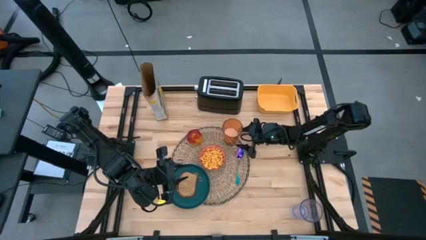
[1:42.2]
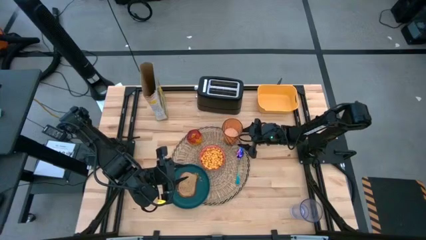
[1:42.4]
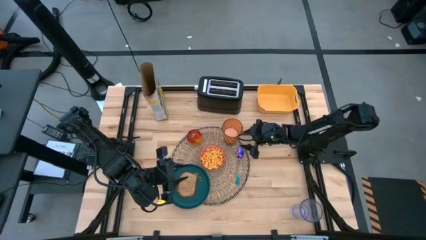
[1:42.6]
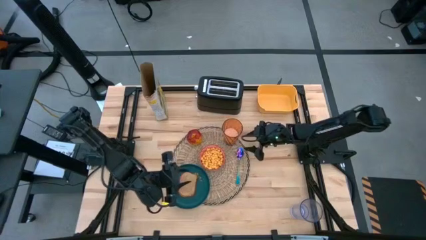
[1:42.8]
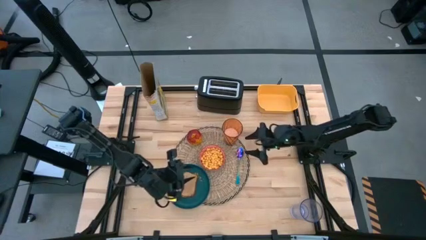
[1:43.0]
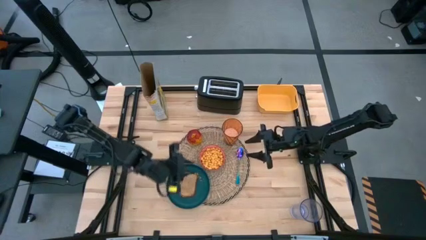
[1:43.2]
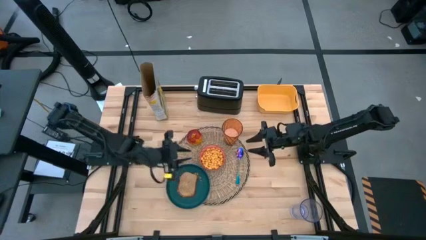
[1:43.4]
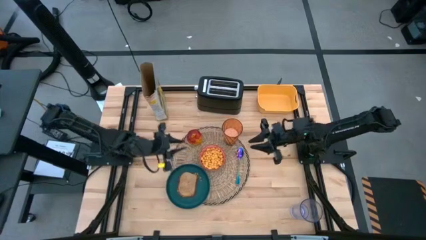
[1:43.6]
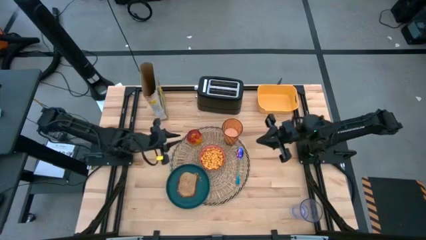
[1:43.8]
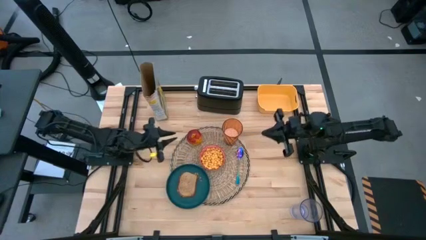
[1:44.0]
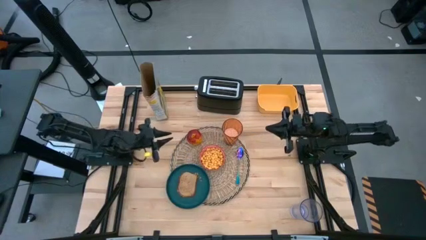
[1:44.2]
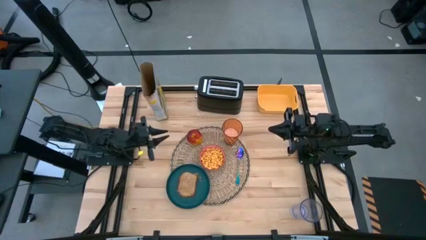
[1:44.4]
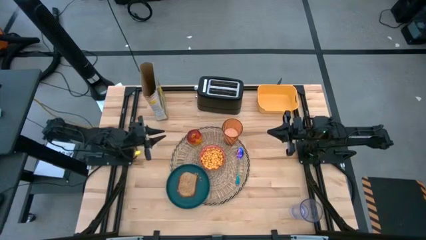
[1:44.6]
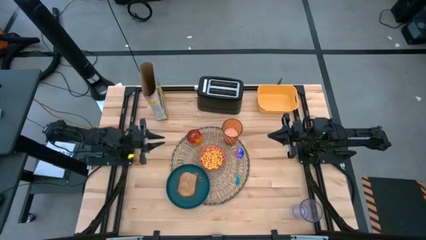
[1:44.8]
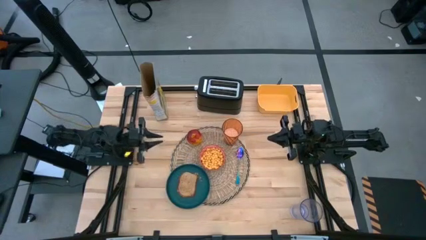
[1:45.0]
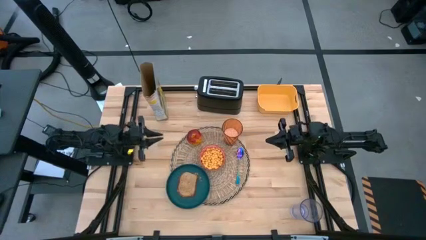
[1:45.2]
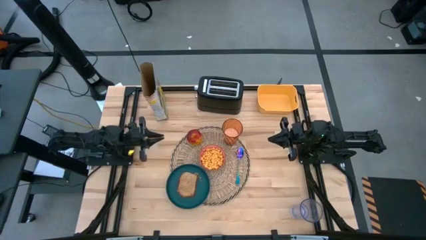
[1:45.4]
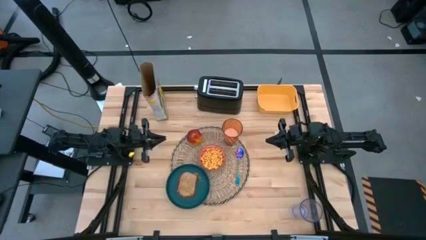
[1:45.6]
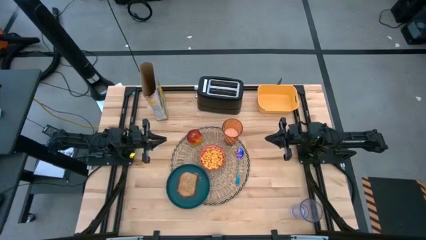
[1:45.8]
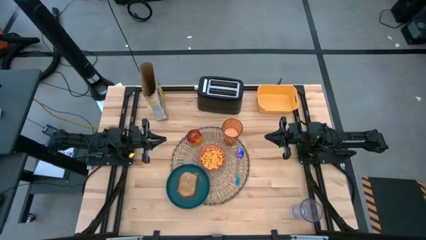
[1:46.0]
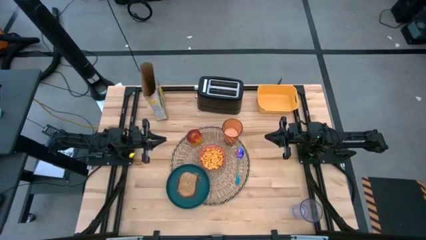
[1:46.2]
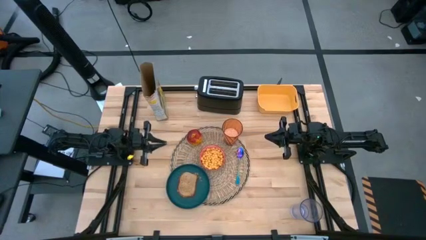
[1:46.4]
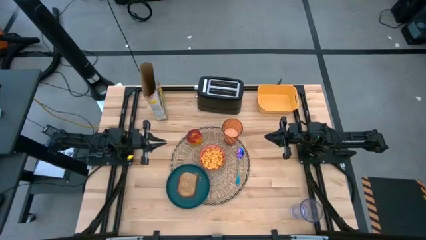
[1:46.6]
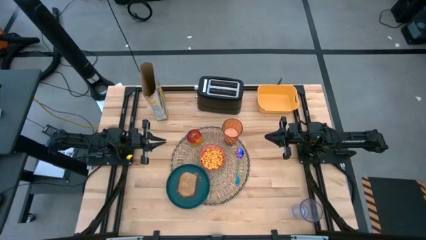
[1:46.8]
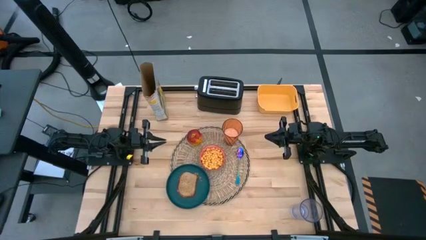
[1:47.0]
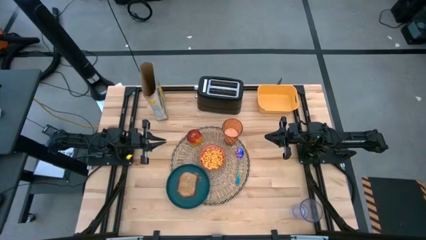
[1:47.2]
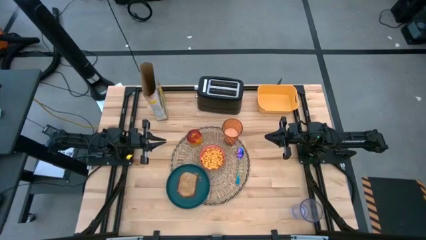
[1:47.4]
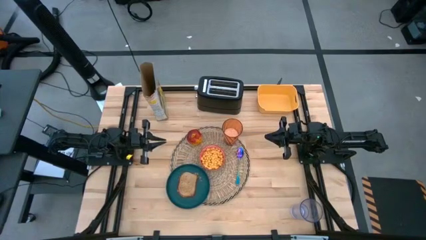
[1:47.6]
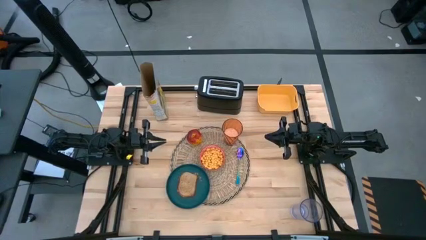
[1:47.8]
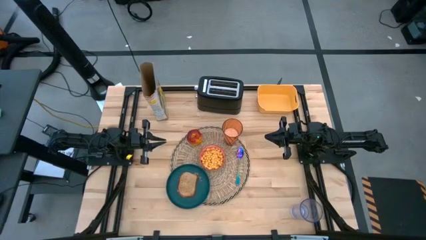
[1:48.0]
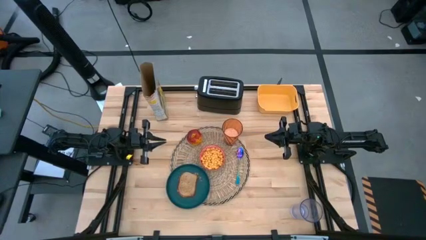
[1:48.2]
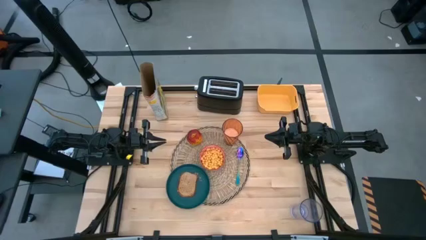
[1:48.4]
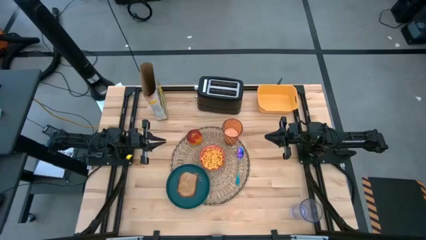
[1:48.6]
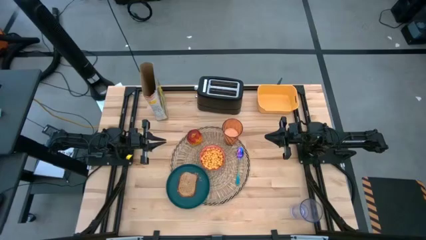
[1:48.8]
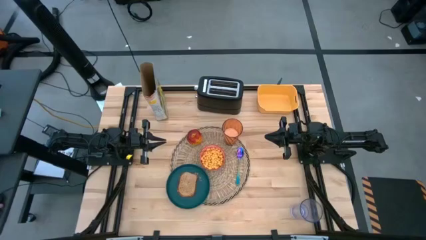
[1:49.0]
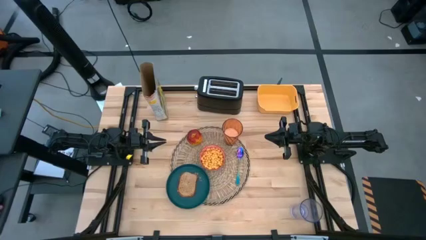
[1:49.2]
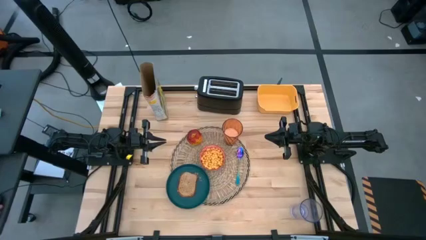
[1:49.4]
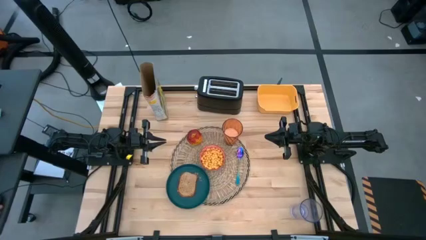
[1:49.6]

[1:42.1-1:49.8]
Task: Arrange a breakfast setting
Return to Home Position

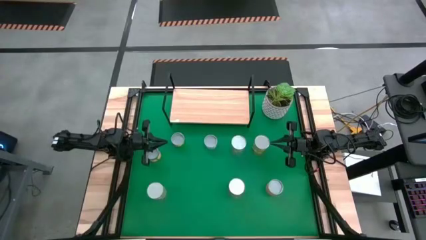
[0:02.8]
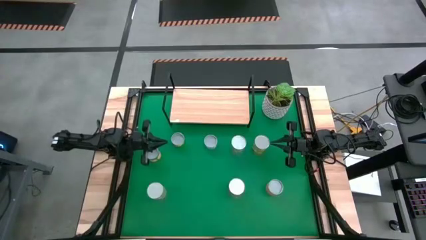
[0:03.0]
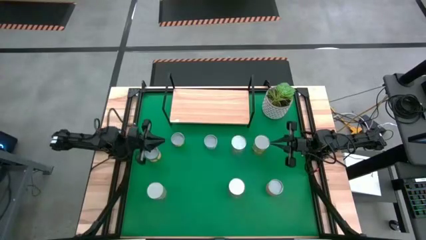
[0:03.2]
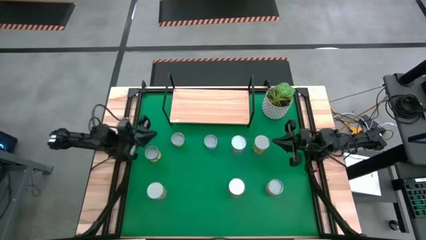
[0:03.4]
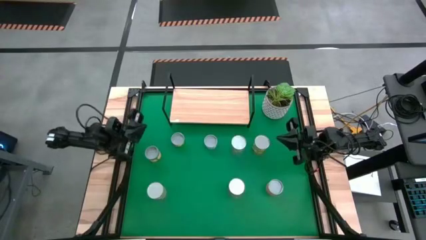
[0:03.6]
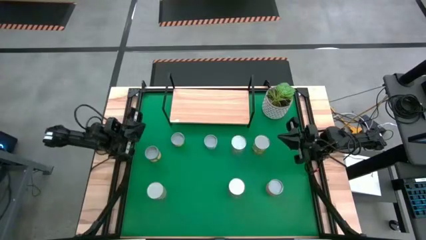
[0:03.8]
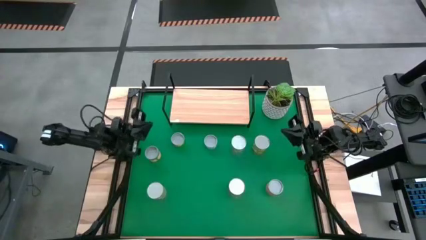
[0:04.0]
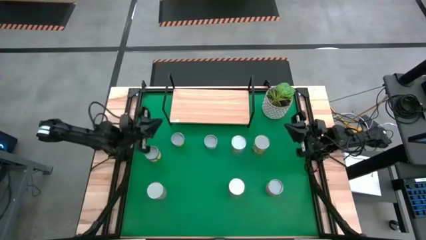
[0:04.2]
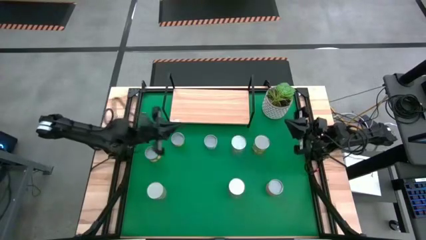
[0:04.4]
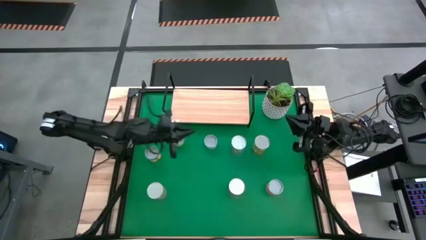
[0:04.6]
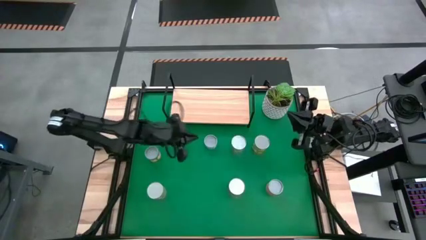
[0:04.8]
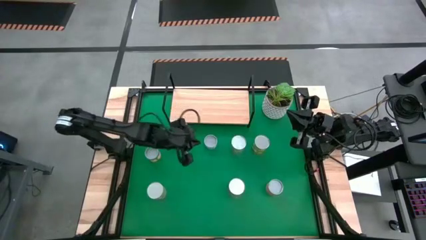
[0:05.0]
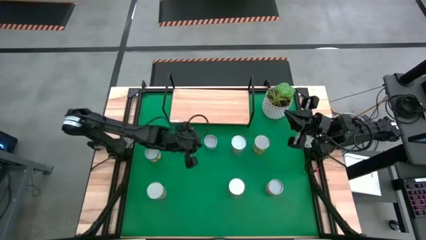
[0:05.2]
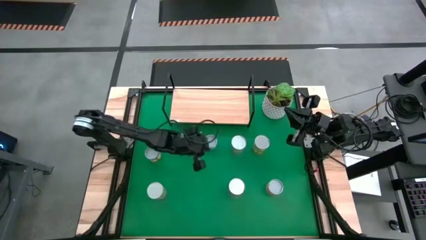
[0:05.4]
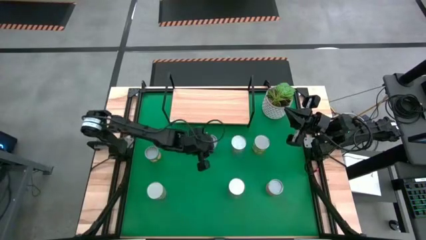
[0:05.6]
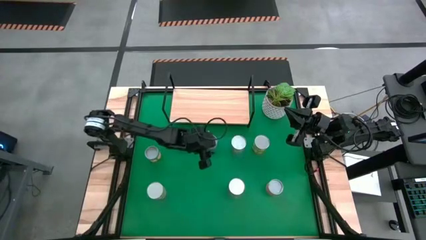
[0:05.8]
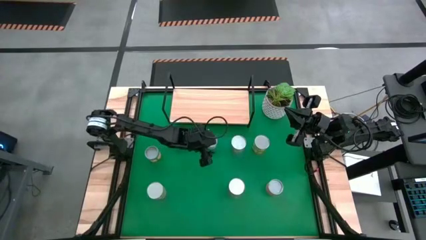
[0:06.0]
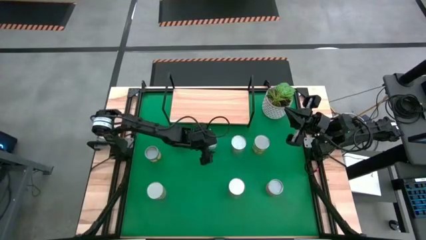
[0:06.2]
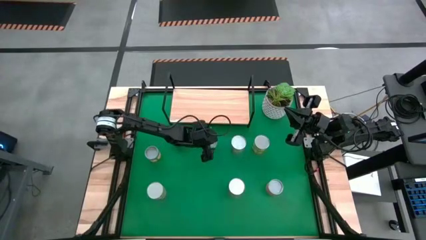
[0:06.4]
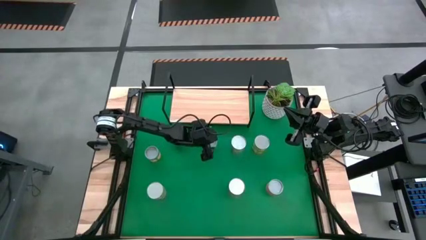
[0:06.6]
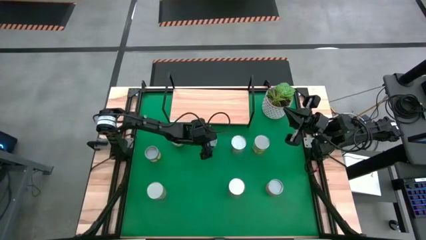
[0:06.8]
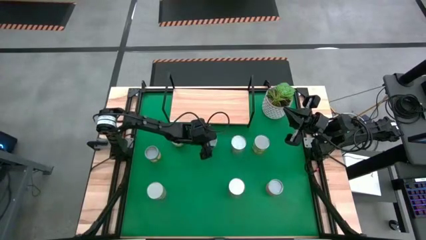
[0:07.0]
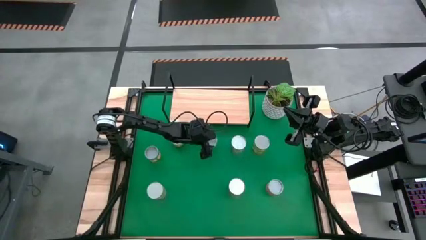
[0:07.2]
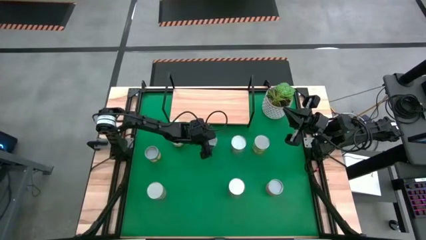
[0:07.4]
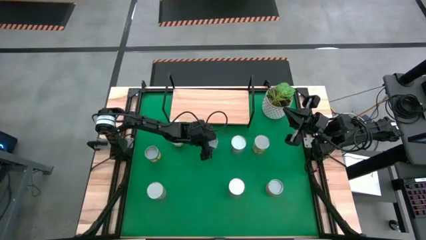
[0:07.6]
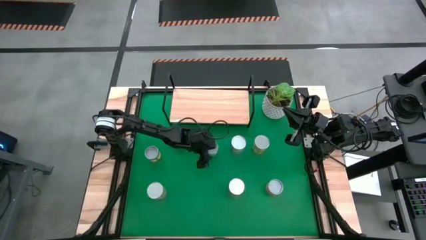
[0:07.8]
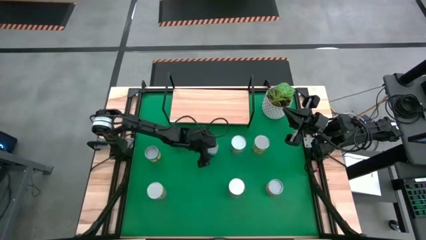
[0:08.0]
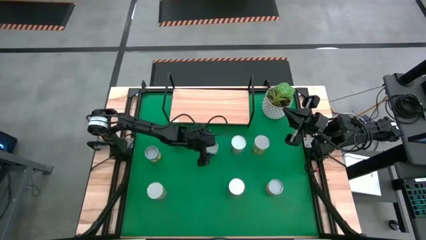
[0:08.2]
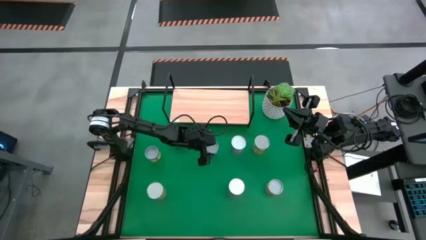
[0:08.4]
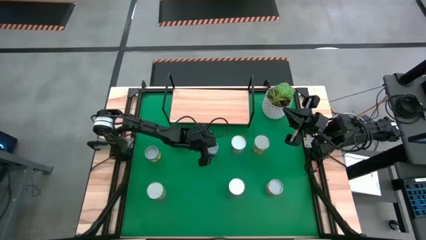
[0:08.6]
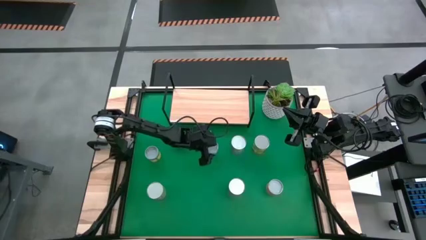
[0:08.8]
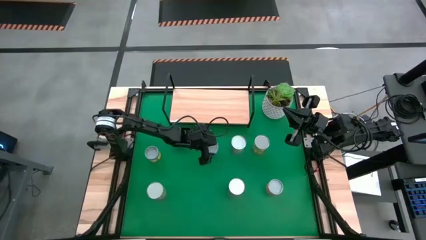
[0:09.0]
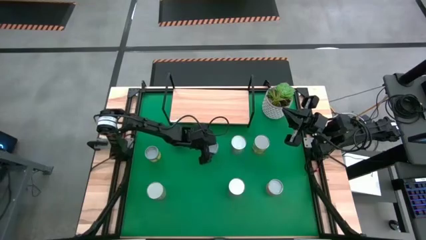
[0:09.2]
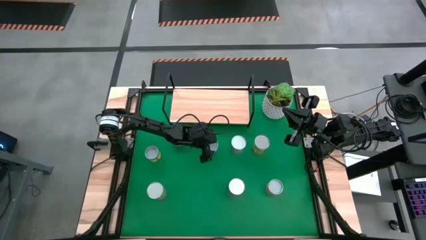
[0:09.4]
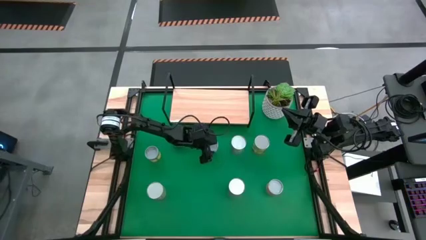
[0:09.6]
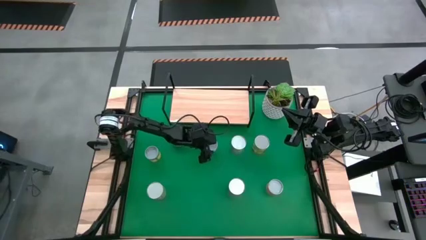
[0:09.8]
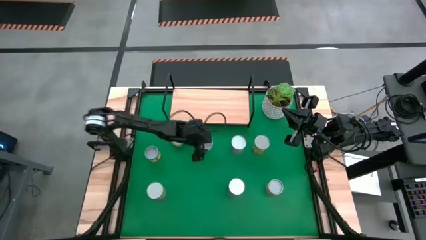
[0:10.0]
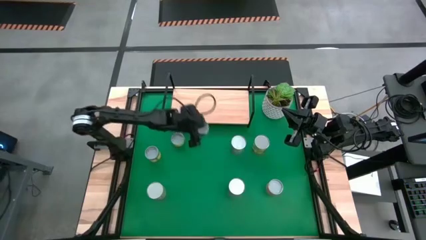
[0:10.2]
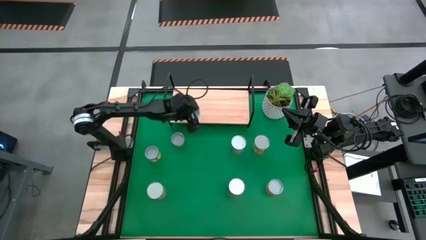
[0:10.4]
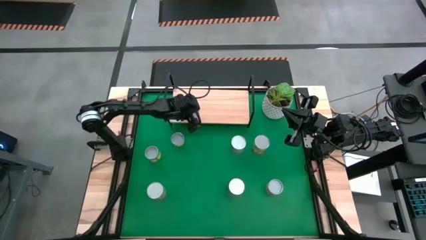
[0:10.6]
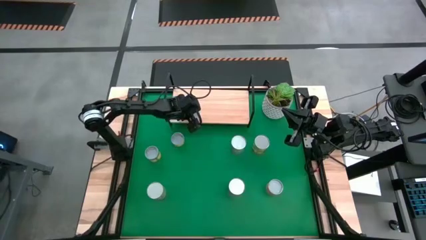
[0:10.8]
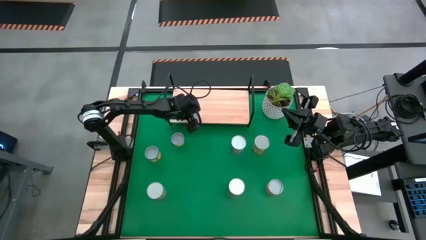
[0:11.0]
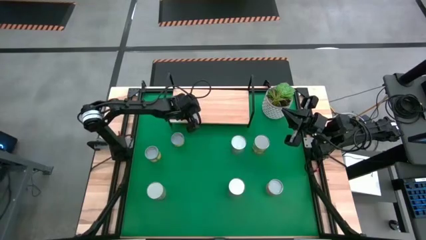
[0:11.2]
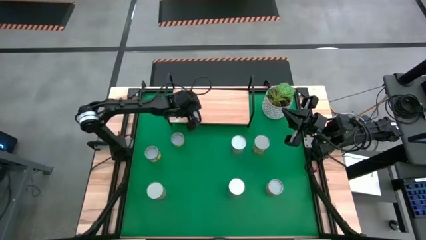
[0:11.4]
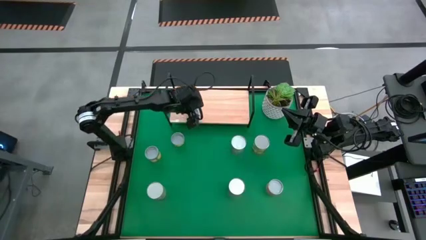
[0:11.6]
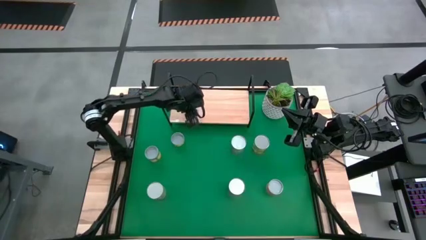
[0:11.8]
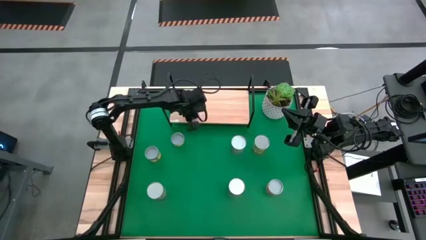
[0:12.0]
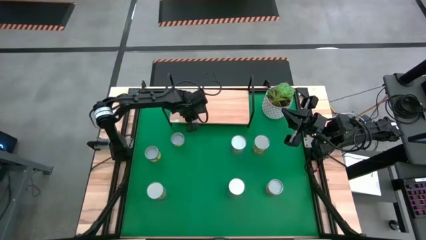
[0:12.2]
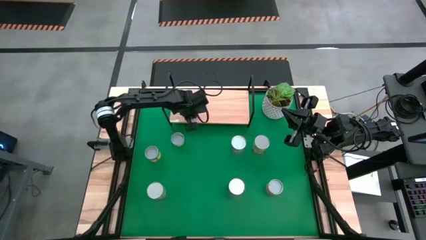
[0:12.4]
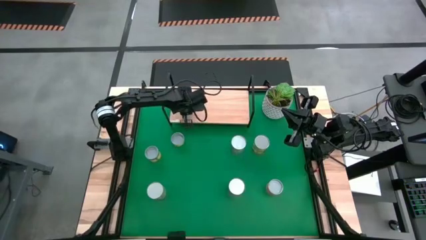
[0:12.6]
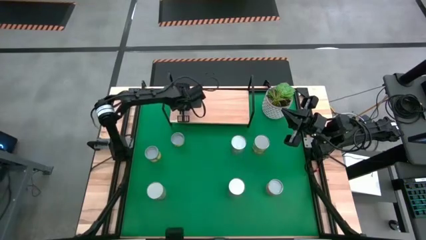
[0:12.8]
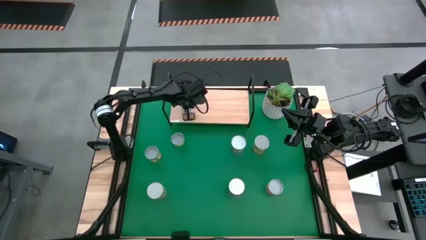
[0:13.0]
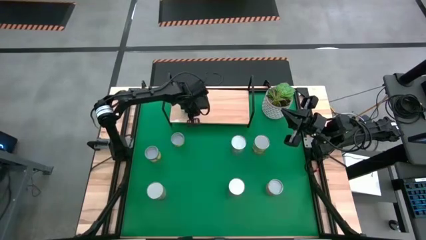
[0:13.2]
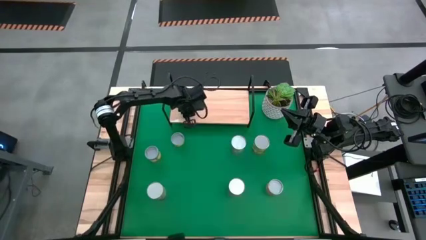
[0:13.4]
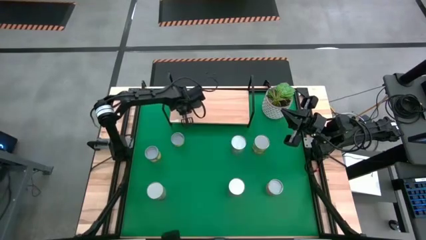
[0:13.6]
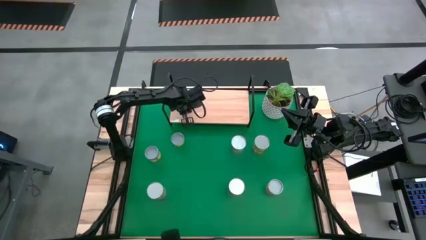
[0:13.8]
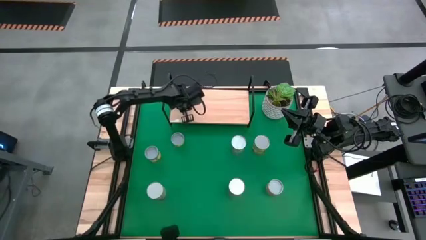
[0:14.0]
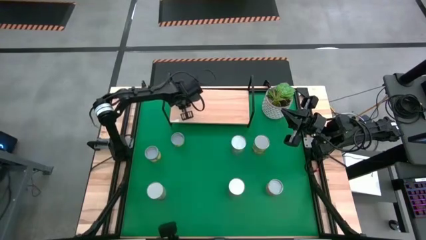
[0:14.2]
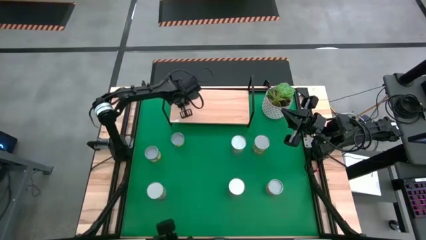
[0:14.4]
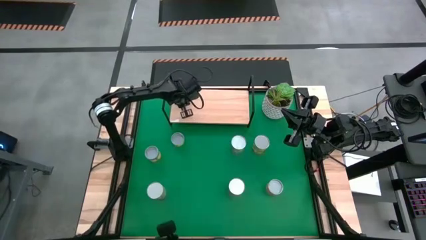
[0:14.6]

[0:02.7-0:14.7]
Task: Pick and place cans onto a shelf
Put the canned salmon good on the shelf
